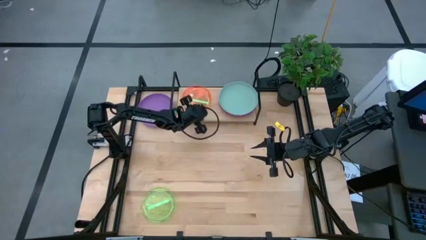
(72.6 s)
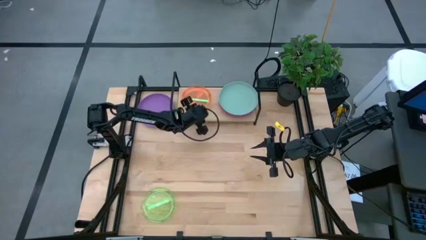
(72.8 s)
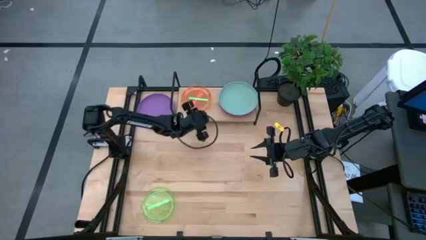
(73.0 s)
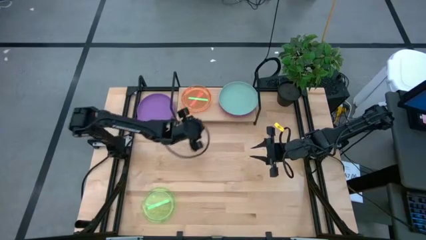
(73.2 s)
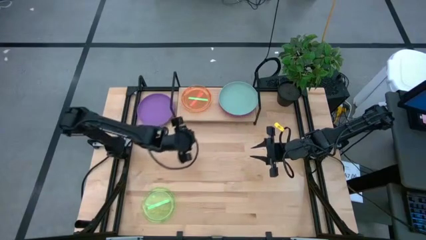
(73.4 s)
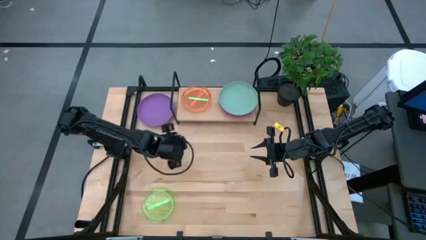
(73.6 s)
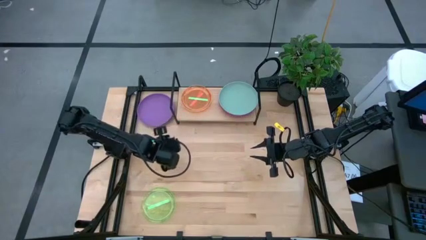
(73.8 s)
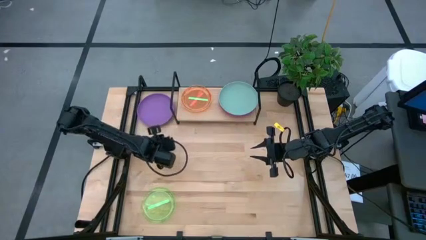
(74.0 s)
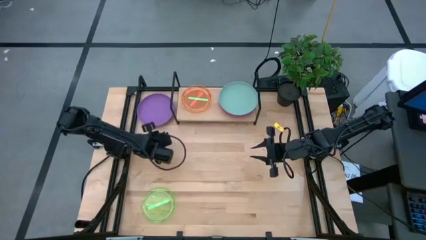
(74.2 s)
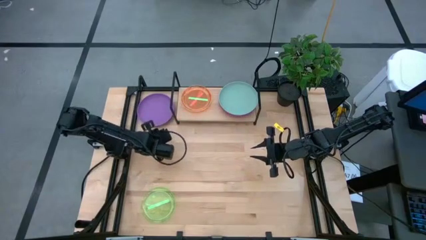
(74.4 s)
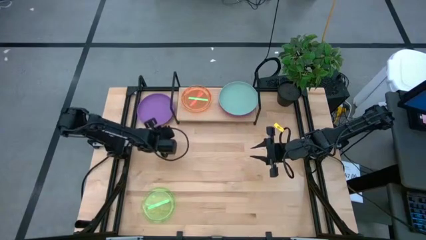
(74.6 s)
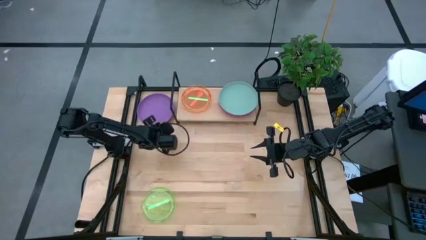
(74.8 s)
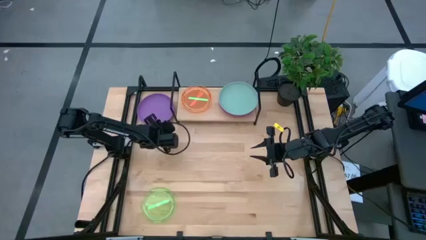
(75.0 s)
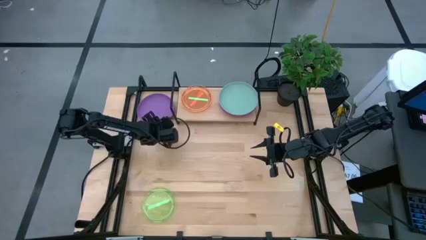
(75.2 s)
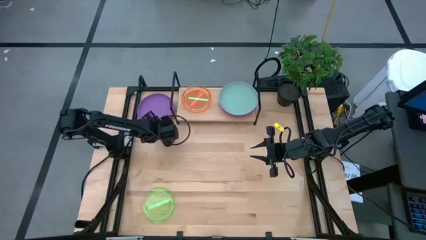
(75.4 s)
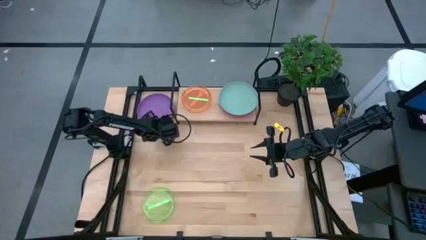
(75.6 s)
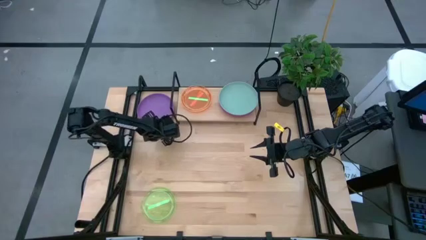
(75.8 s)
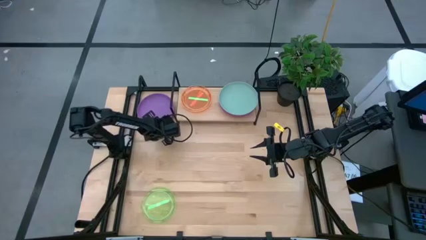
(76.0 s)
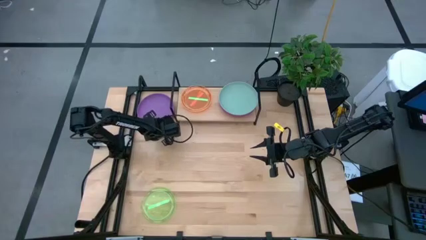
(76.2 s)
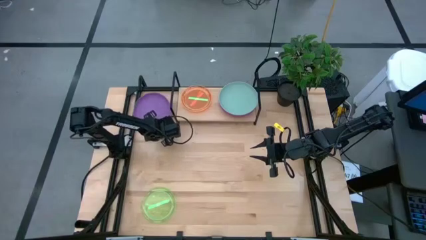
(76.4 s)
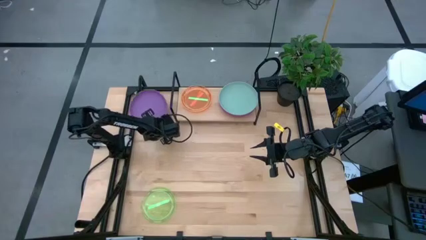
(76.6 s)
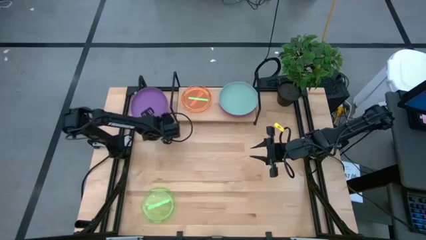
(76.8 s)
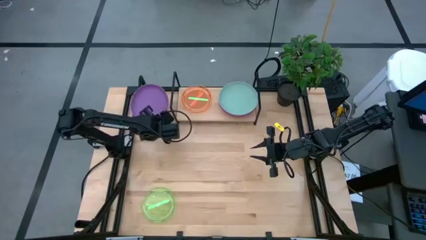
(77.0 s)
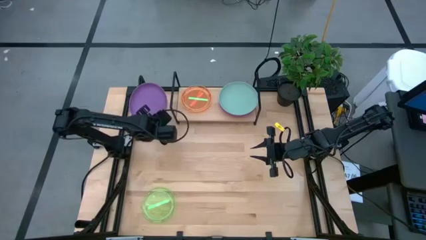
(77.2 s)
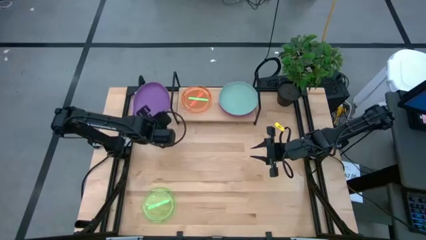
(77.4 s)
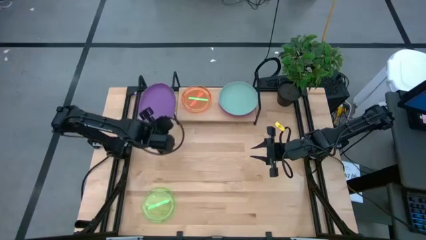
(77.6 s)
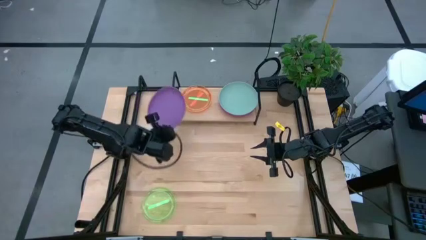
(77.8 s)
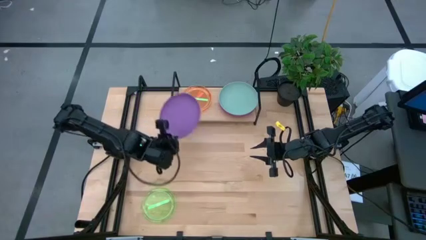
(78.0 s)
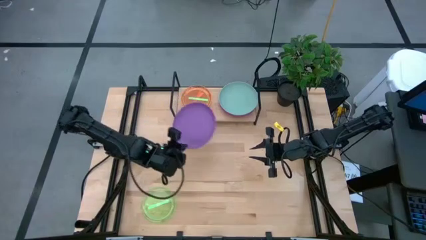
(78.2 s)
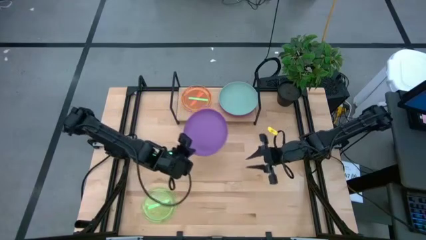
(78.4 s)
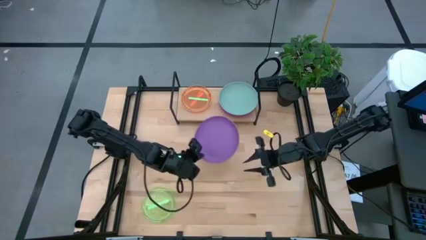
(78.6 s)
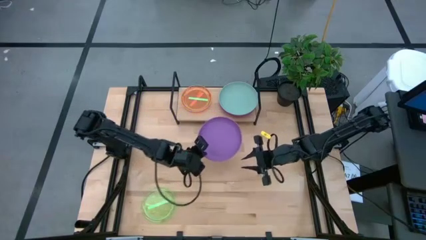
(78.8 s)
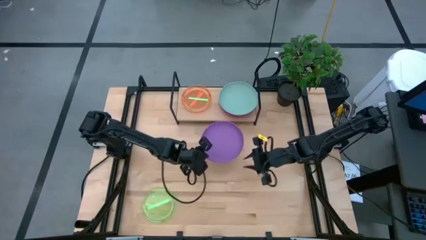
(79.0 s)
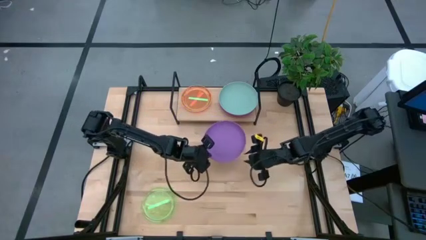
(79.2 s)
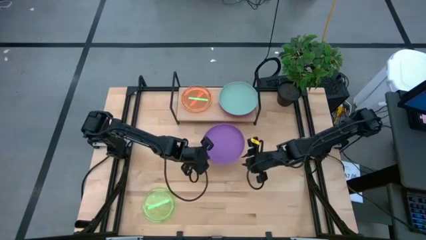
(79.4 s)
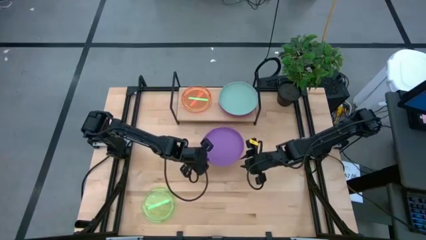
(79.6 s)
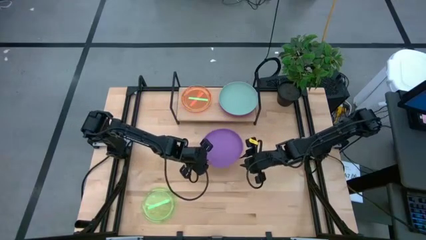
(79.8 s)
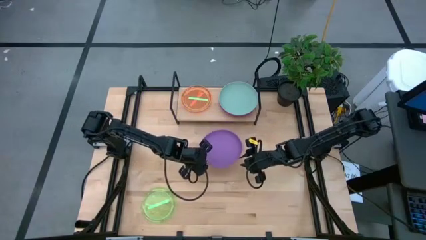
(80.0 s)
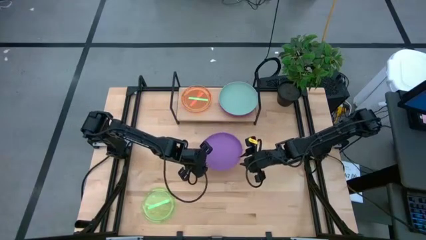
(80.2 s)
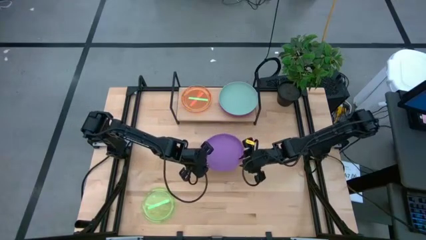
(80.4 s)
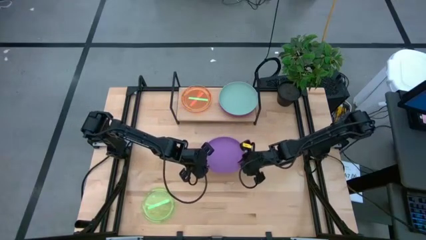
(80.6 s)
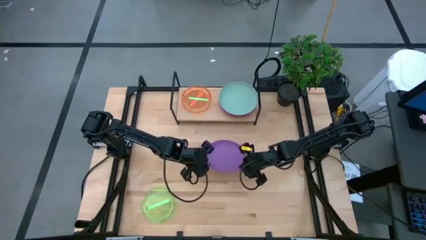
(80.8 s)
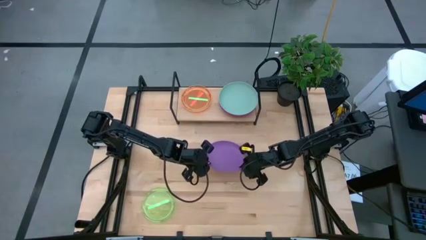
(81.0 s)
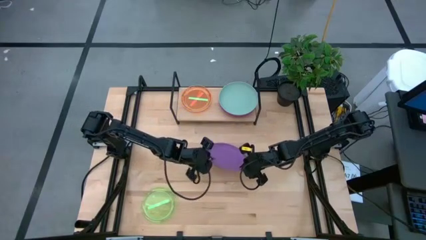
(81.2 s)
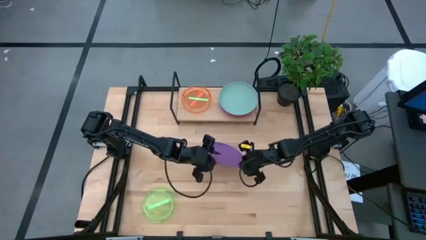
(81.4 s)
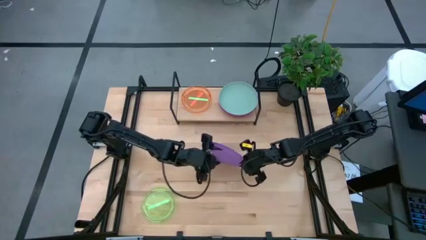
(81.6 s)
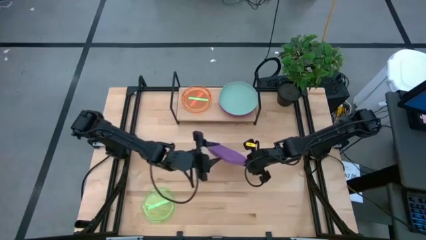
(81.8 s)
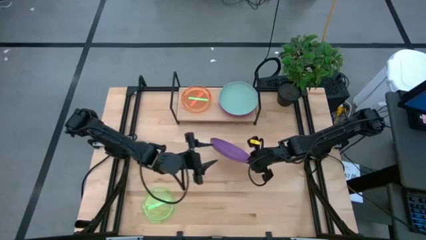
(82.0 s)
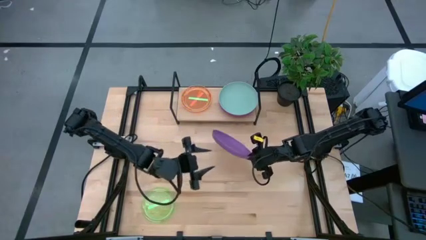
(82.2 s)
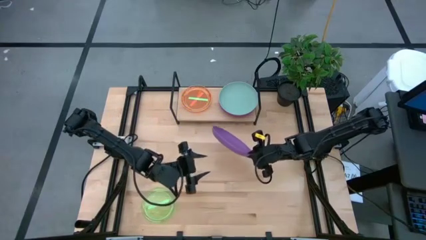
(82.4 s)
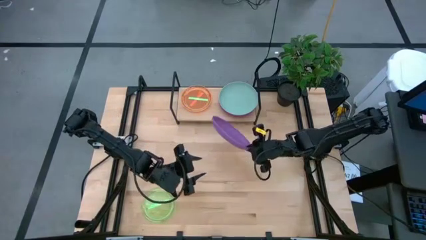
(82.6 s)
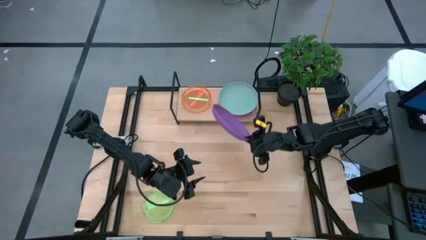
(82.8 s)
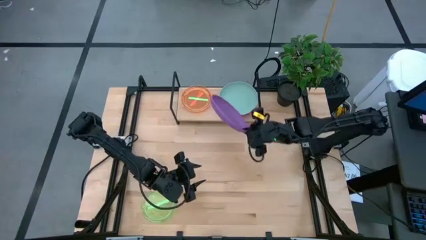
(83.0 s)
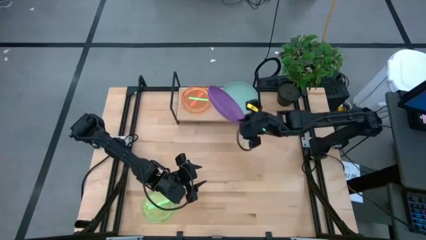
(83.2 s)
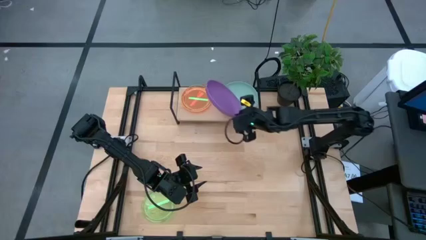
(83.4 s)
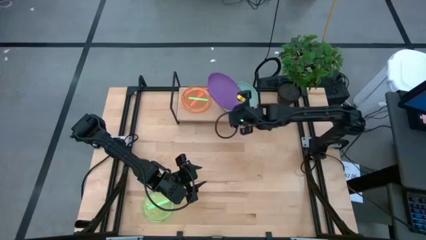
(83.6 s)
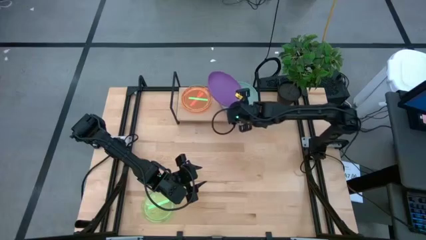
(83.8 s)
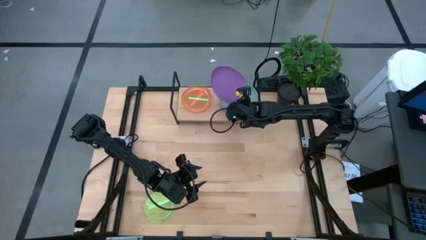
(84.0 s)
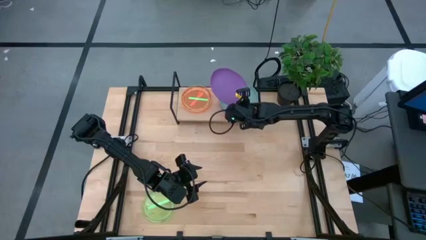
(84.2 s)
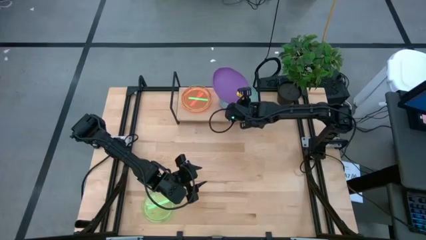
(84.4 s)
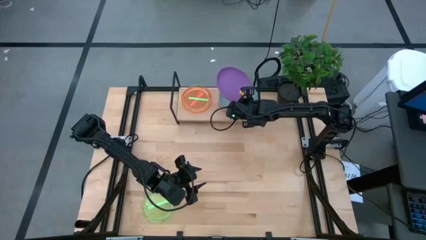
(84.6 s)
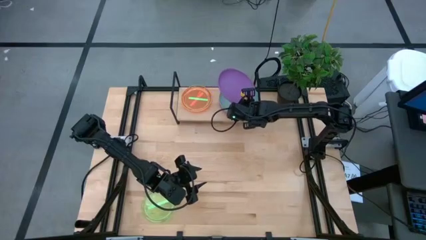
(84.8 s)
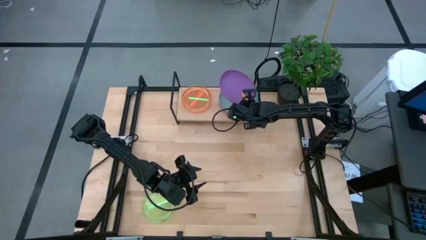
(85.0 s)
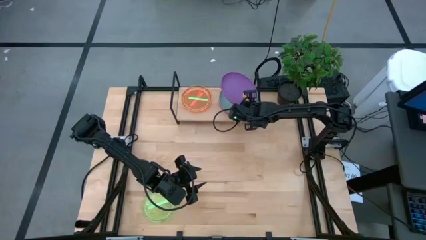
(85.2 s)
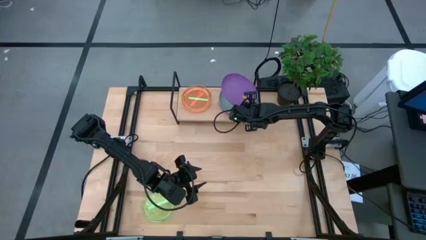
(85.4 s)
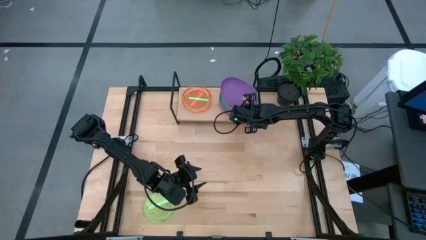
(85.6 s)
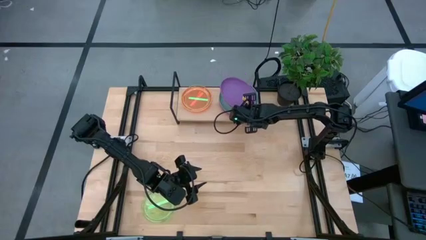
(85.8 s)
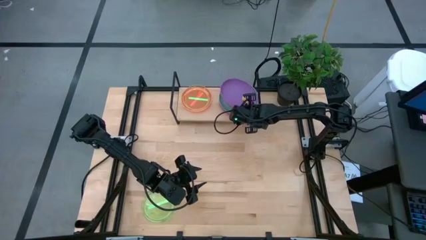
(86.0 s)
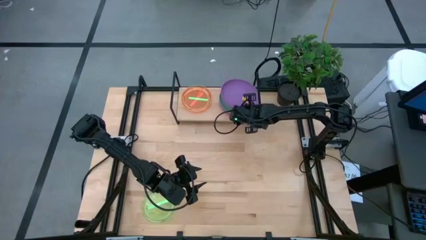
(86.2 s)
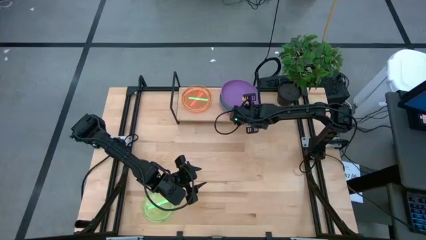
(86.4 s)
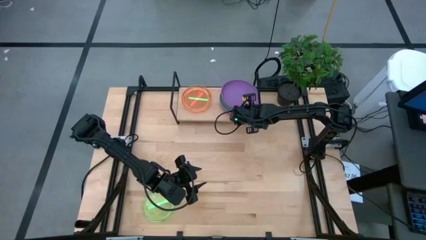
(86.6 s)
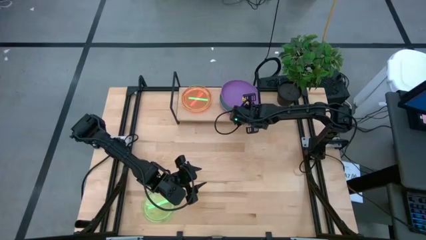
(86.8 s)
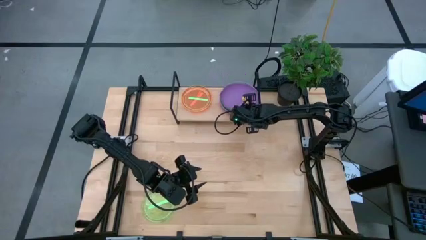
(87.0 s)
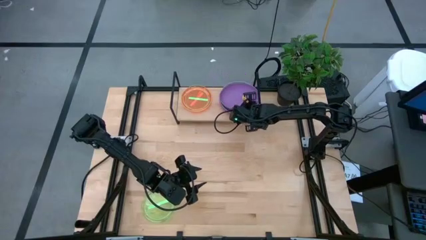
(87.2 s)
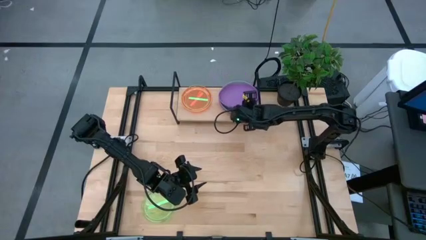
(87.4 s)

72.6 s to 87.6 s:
Task: Place and stack plates onto a shelf
Stack the large violet plate on top of the blue plate
